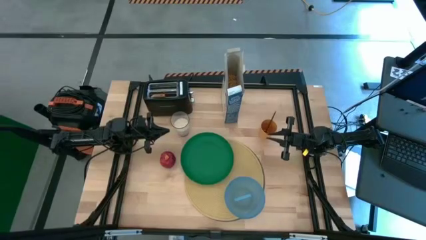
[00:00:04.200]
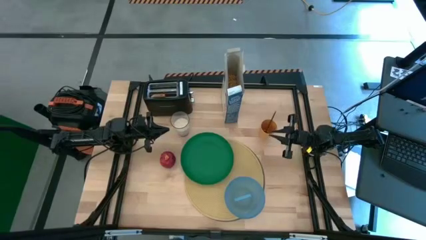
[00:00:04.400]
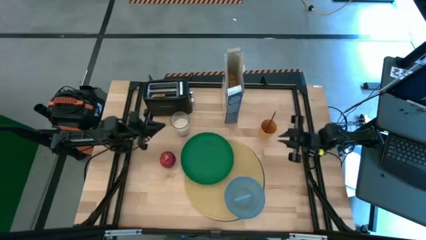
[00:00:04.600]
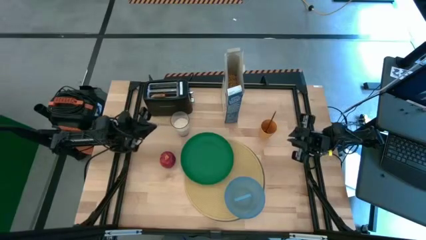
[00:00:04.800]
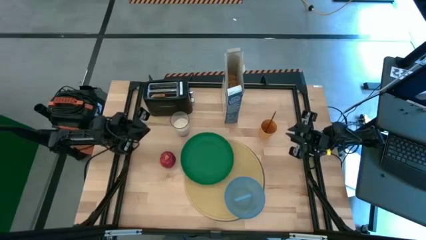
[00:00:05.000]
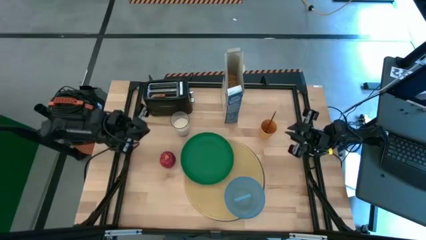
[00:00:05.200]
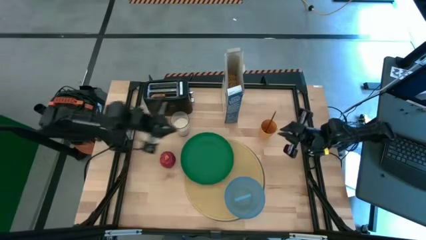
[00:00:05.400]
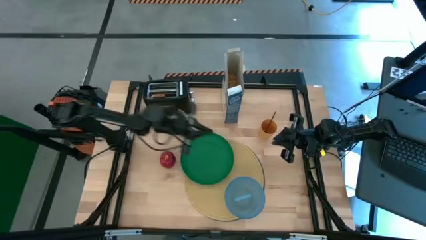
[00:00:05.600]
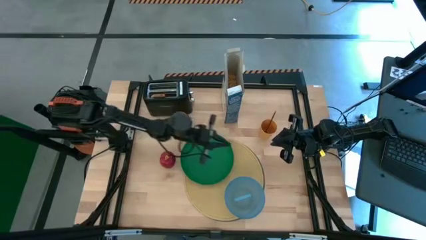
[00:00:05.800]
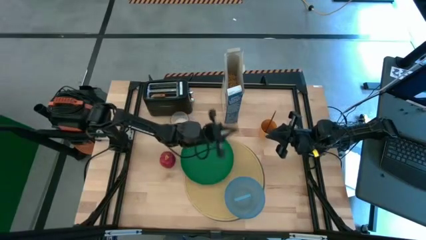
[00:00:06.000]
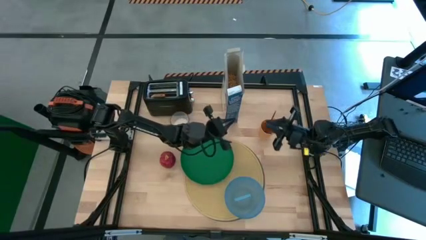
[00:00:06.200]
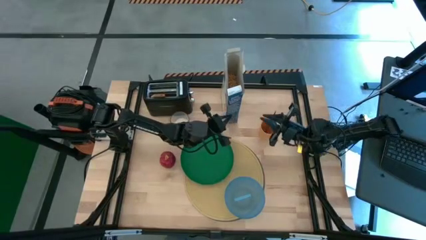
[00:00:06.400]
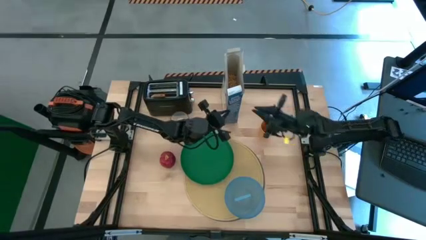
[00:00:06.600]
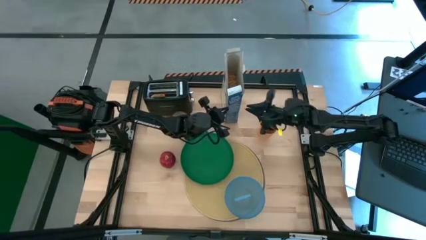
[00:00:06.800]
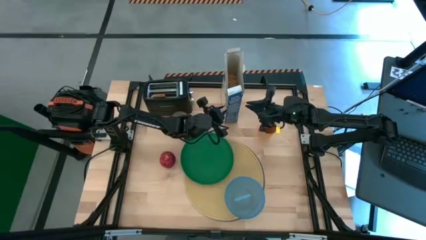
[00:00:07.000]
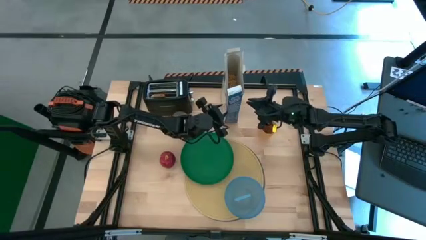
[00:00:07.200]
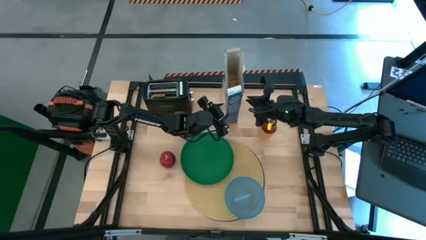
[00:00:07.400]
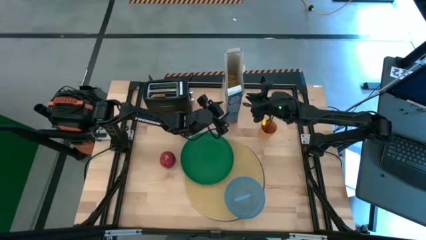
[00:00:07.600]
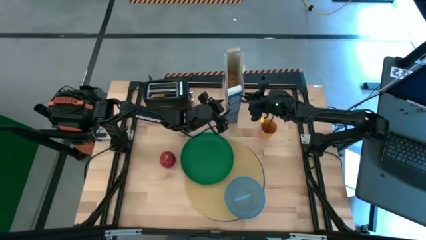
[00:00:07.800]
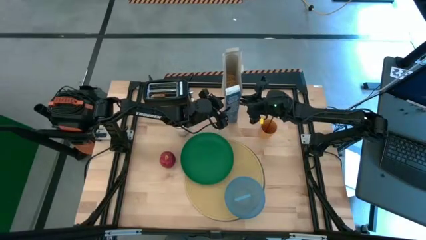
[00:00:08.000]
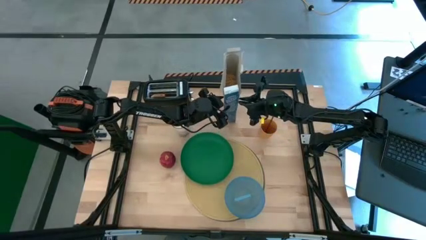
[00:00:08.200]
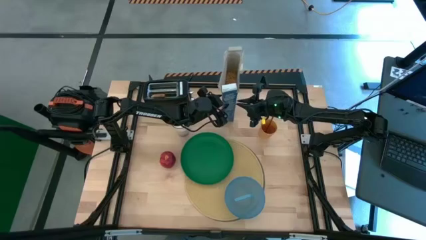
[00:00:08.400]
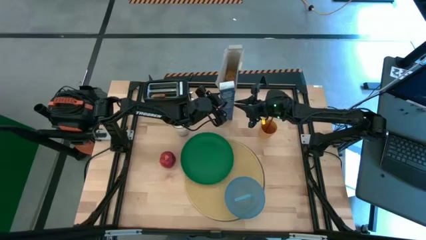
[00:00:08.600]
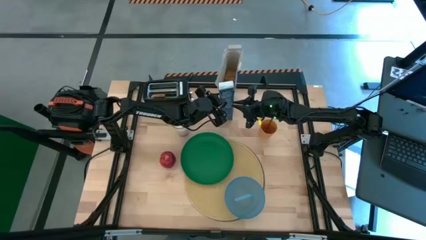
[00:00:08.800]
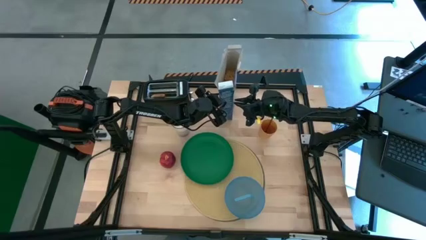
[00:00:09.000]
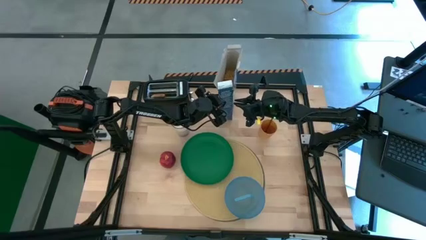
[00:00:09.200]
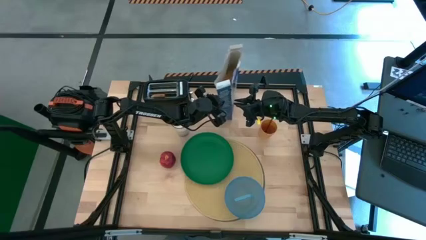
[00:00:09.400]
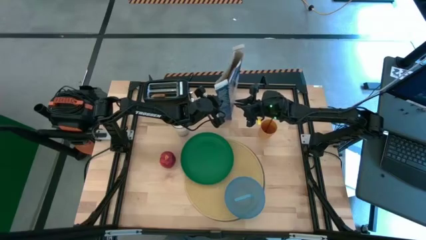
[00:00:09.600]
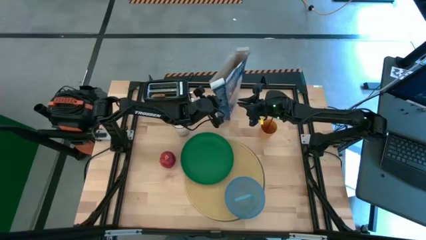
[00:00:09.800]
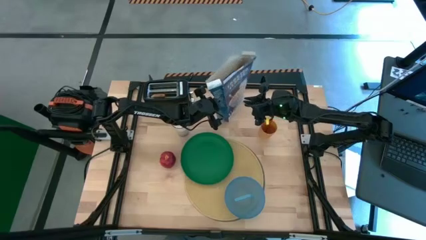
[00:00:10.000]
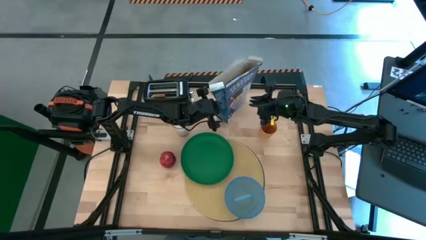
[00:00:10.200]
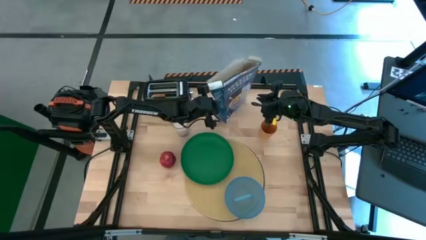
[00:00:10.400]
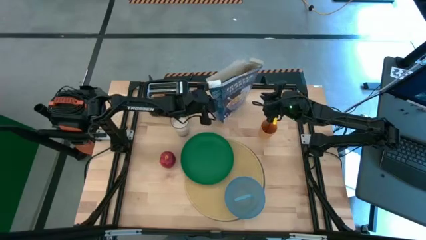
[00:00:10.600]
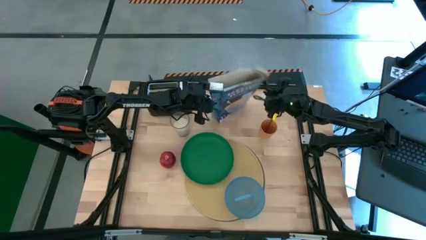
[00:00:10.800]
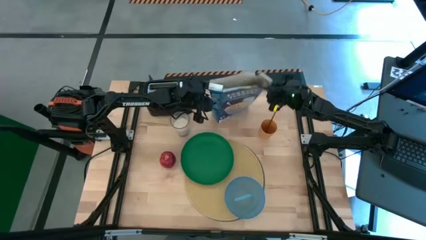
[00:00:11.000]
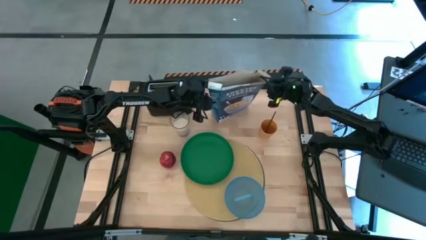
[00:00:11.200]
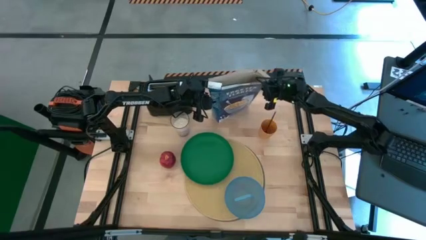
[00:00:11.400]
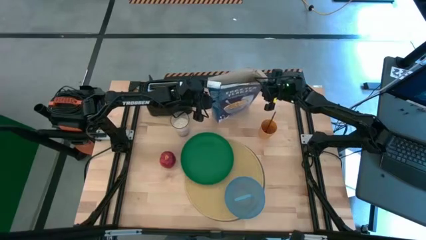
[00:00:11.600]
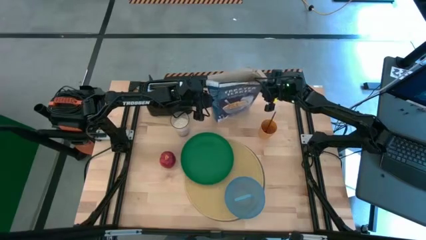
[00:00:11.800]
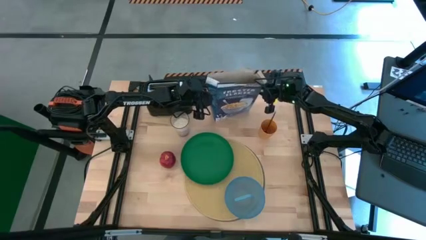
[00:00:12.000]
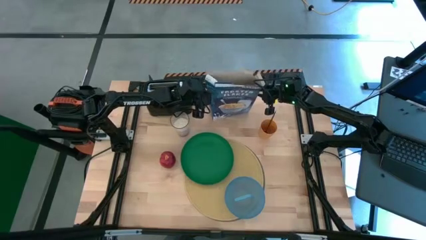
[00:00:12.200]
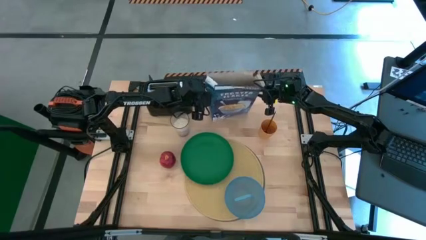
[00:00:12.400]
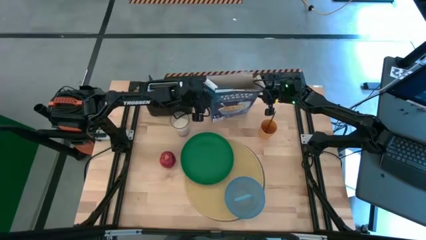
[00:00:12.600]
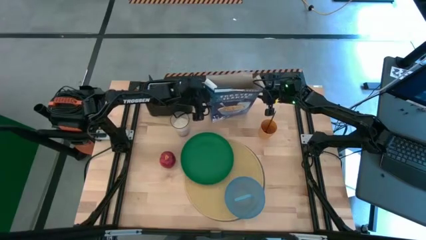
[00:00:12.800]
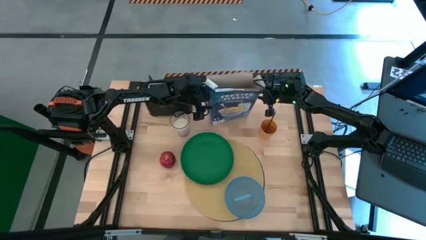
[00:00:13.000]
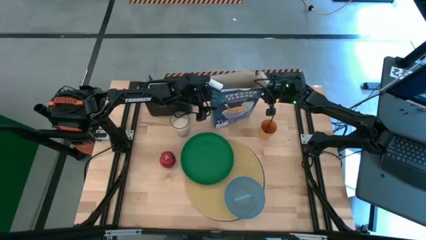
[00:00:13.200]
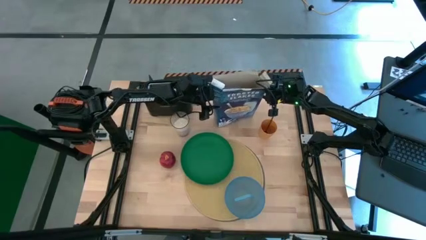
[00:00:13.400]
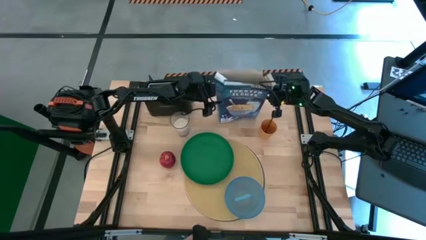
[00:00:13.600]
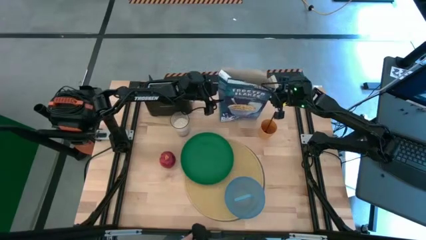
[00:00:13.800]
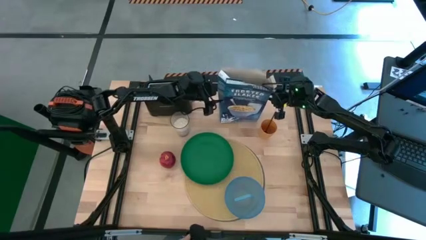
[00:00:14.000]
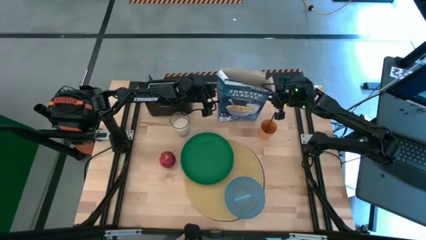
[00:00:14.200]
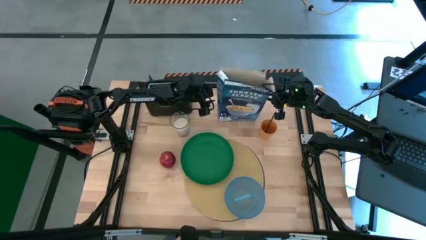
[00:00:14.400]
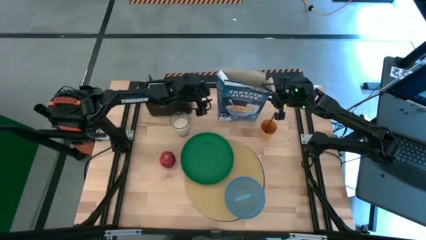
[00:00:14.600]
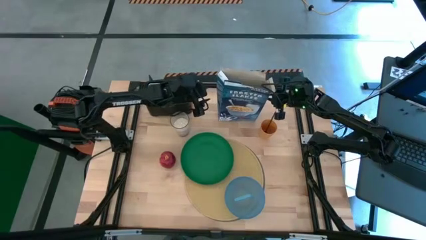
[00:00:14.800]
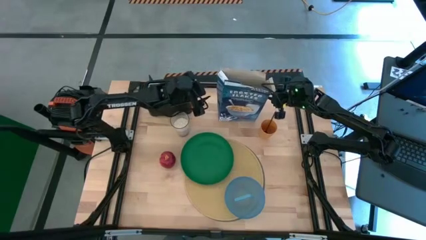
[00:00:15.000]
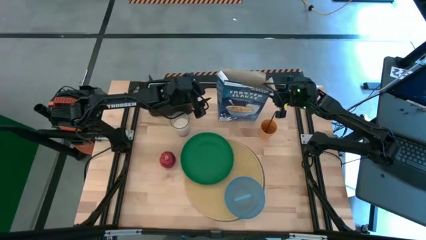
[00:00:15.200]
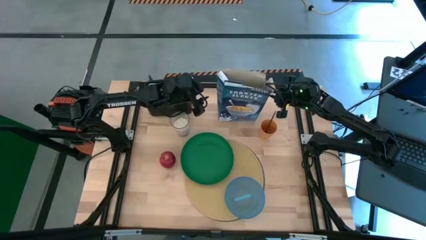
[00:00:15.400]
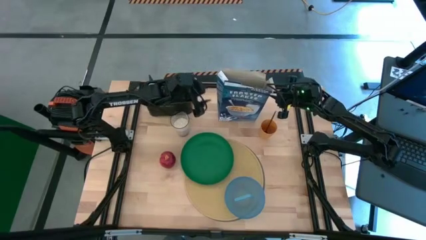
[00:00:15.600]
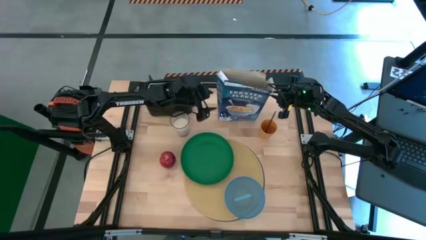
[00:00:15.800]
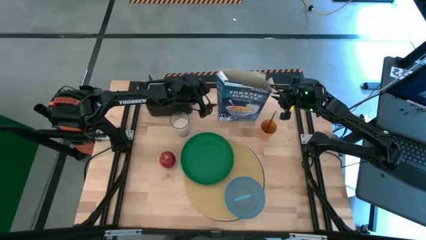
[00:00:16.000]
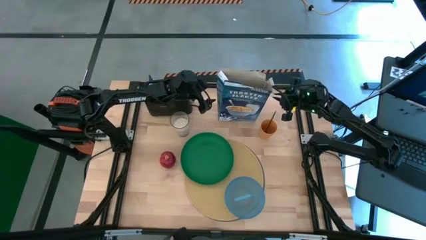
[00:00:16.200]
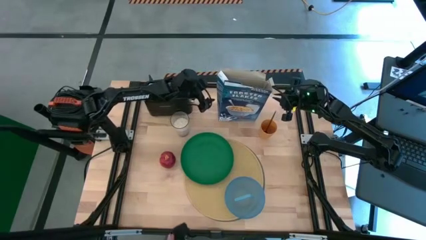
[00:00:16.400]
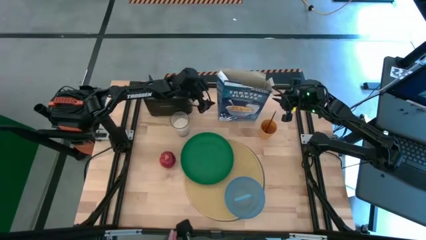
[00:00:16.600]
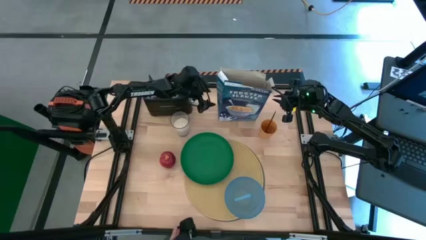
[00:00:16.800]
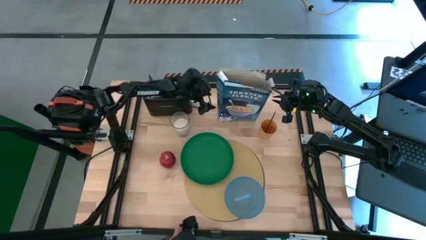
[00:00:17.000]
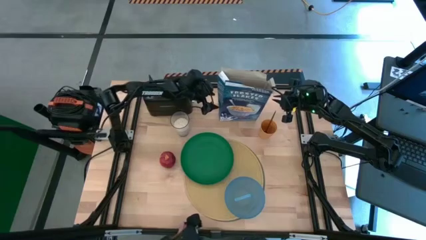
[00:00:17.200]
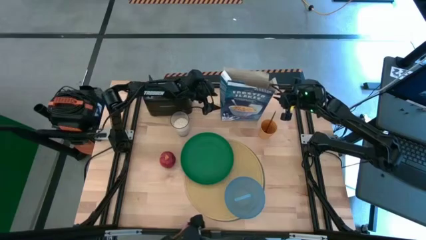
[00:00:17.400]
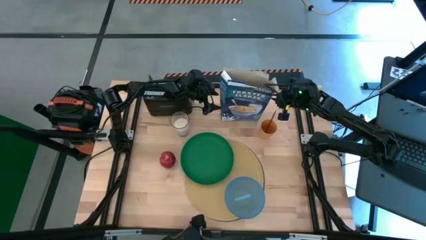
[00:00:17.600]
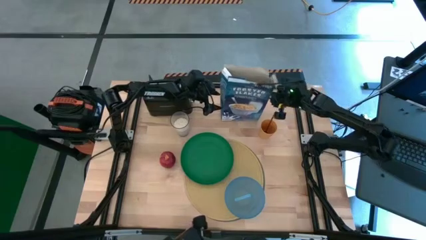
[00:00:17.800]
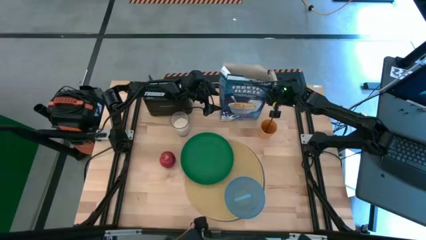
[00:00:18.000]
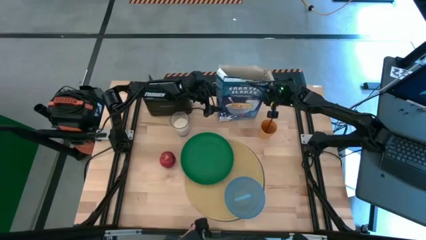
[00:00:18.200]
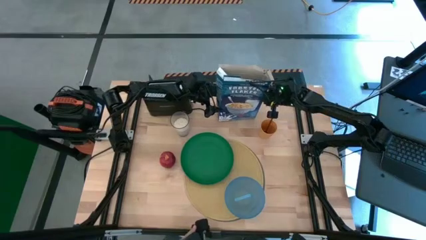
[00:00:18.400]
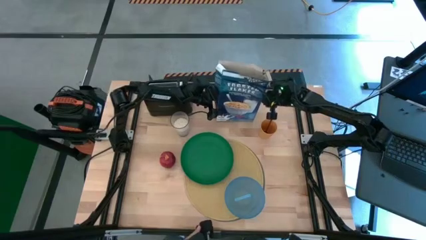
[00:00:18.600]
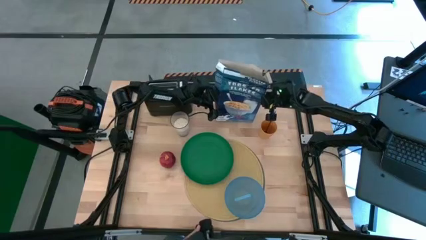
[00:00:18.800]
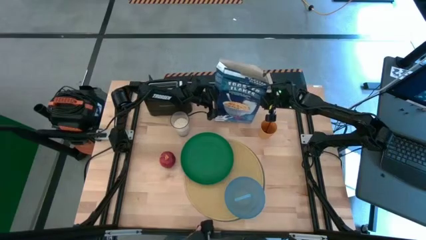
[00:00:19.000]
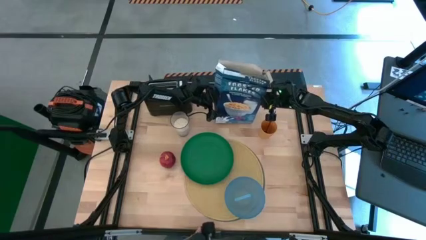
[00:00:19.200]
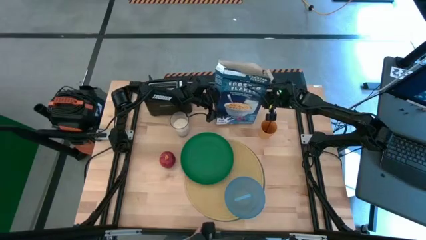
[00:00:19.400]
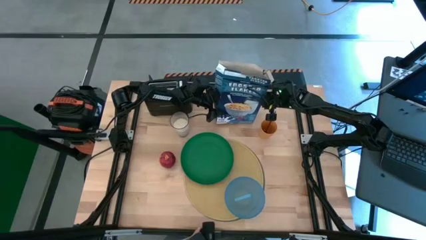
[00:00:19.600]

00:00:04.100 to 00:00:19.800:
Task: Arrange a breakfast setting
Pour the cereal into the blue bowl
